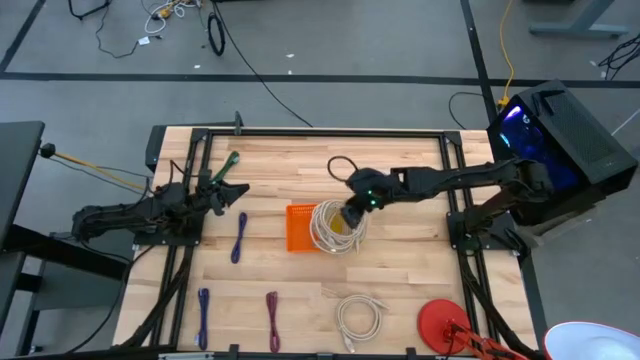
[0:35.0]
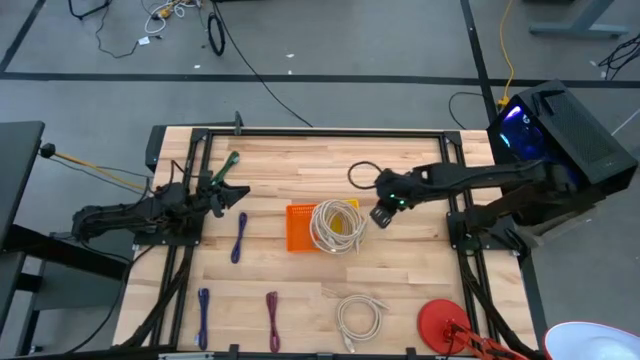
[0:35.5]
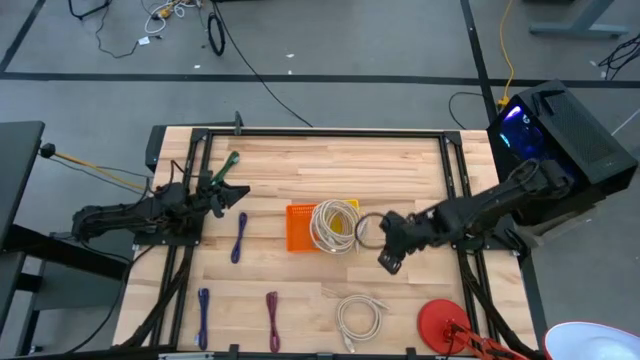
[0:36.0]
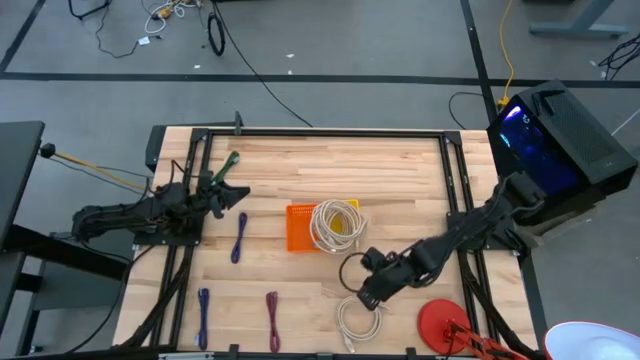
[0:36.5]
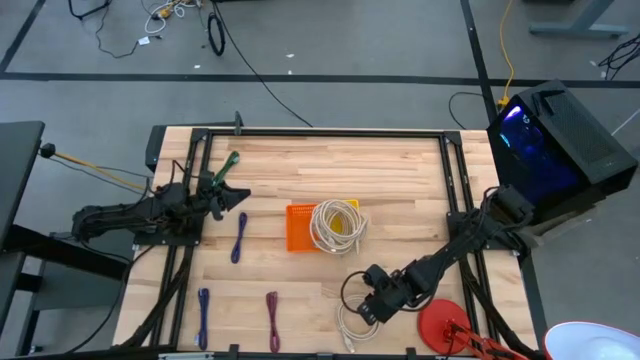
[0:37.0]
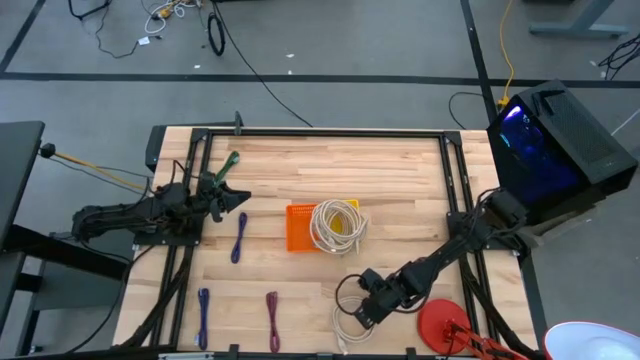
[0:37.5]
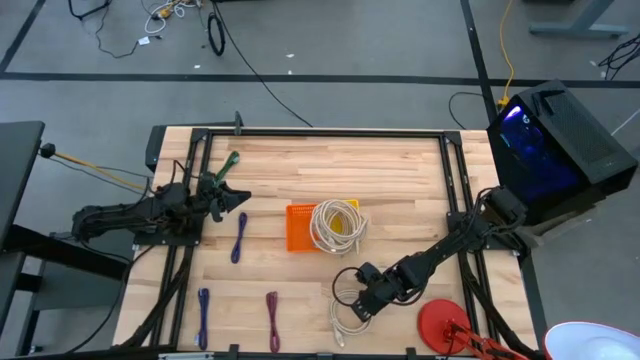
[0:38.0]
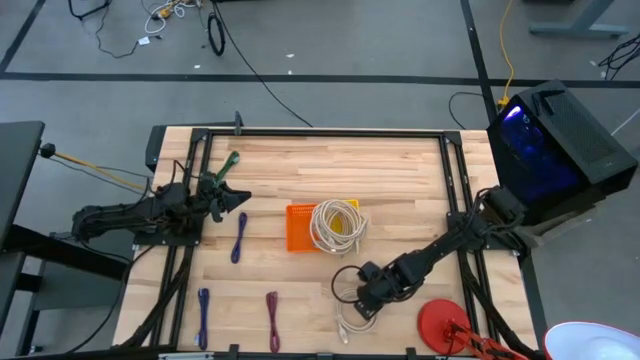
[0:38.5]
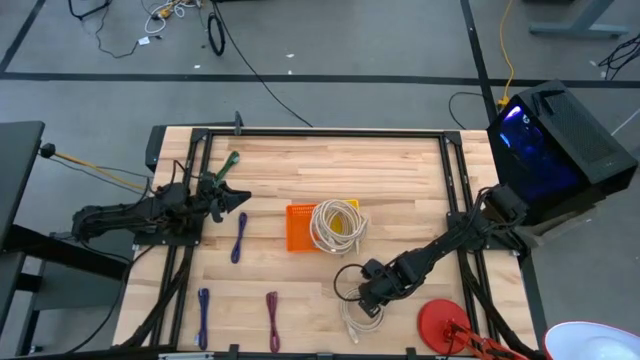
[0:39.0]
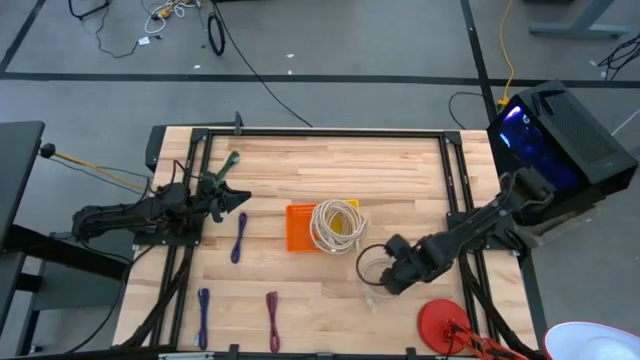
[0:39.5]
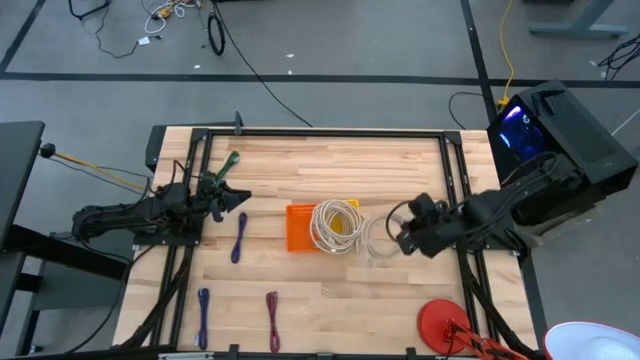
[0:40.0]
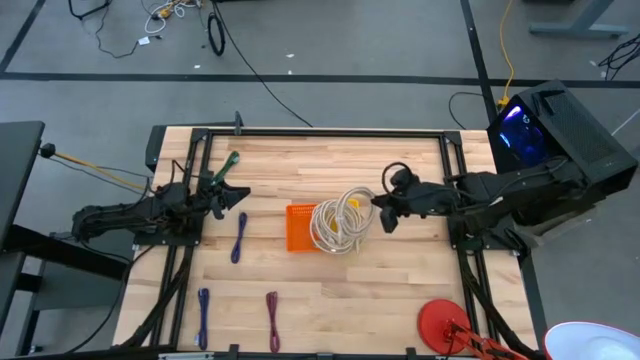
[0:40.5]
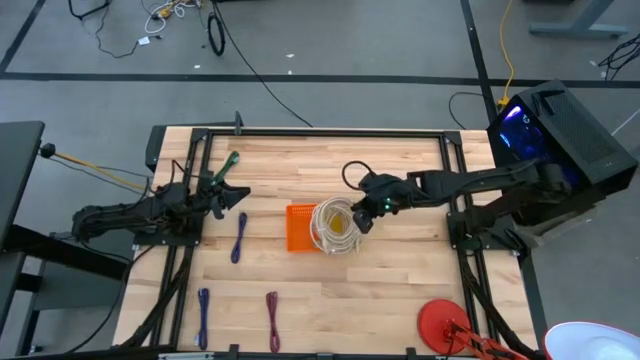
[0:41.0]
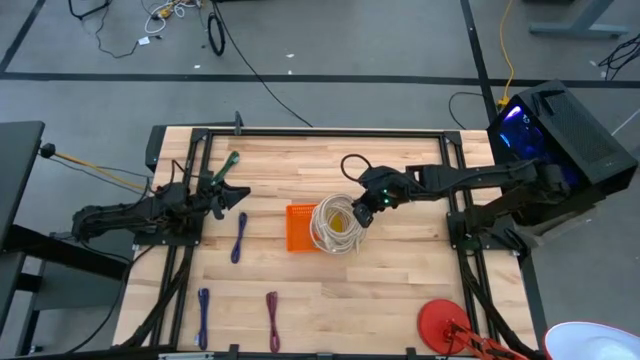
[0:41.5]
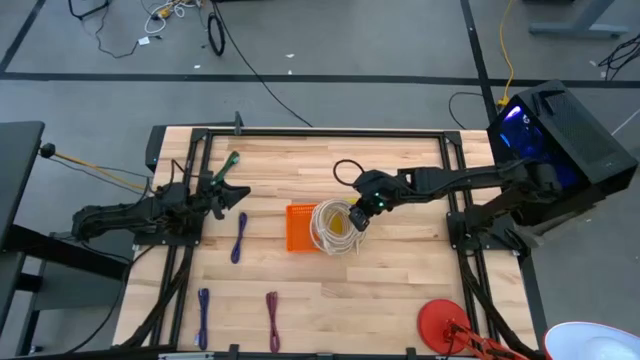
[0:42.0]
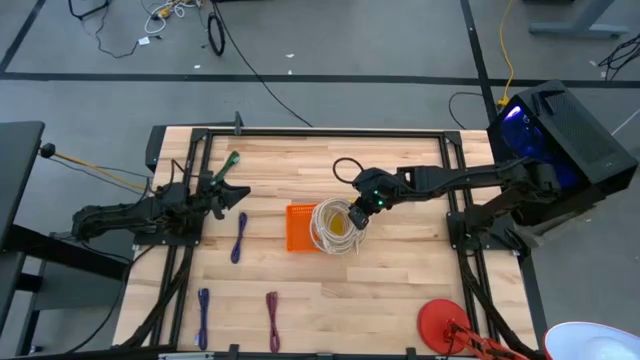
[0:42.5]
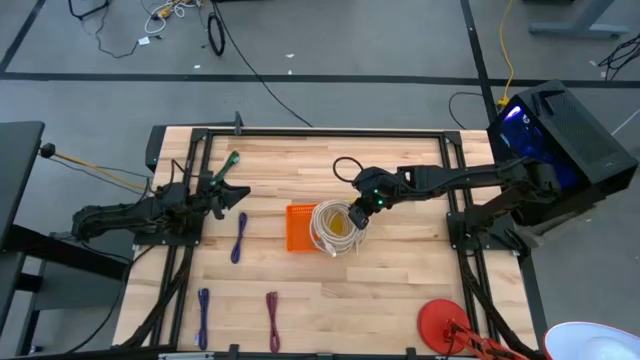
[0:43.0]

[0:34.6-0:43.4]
Task: Pick & Place USB Port
Put the brown HDMI cable into the yellow bin

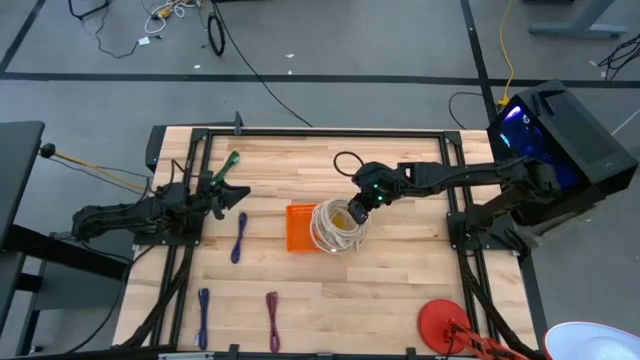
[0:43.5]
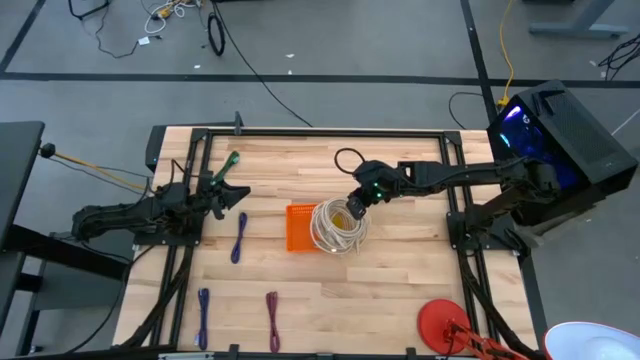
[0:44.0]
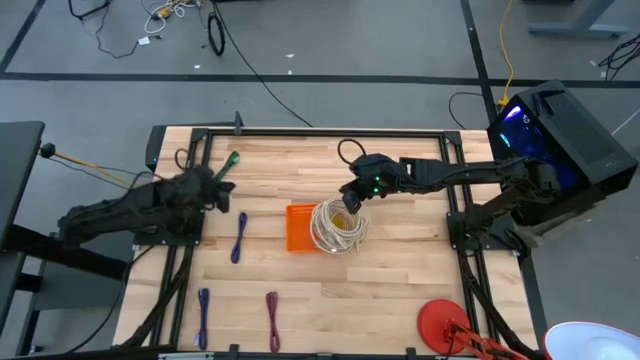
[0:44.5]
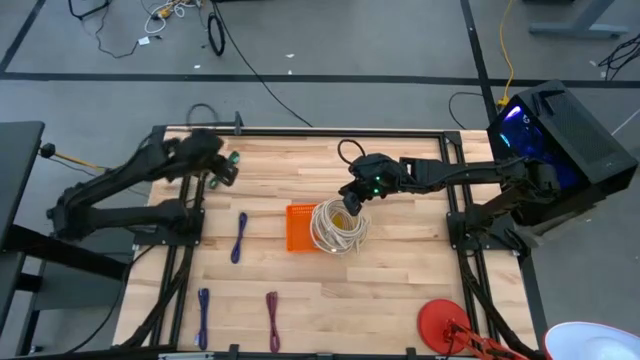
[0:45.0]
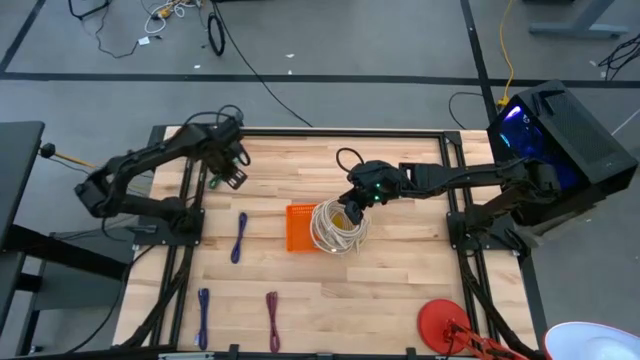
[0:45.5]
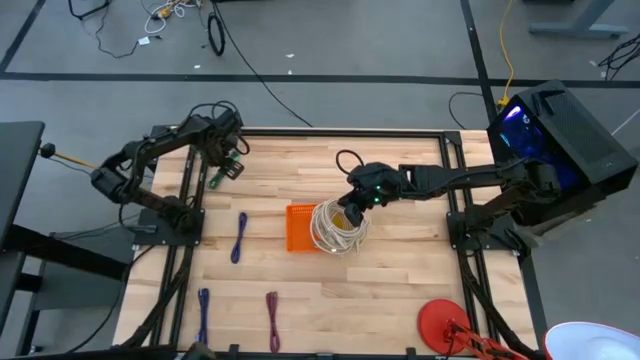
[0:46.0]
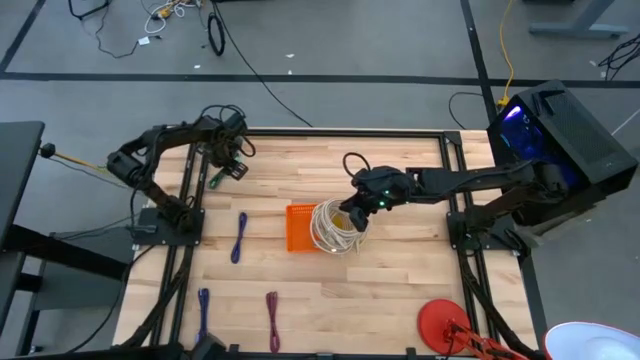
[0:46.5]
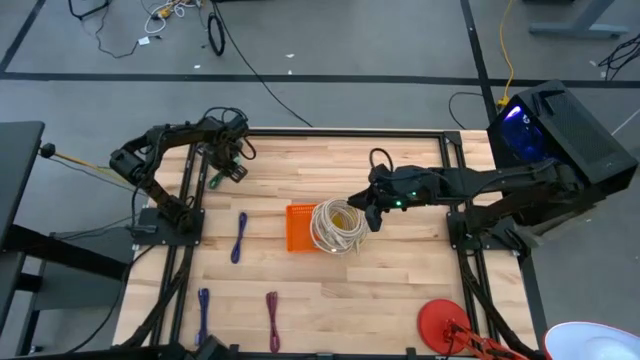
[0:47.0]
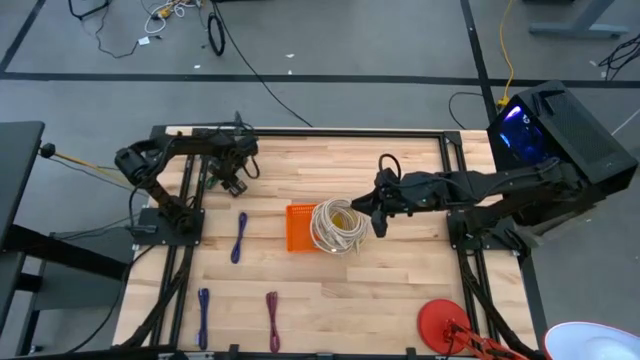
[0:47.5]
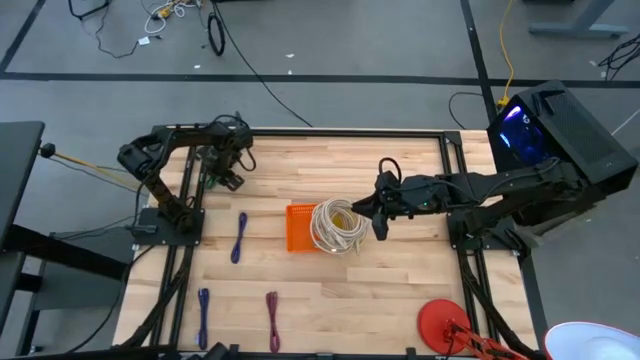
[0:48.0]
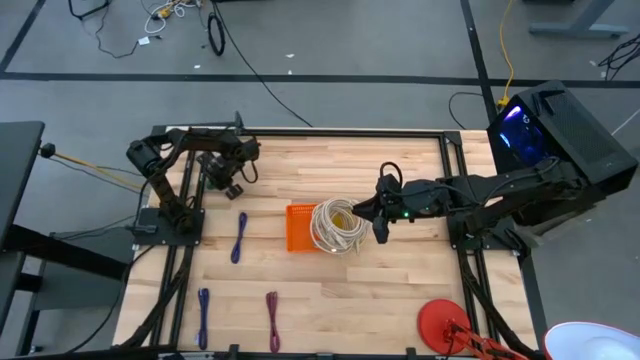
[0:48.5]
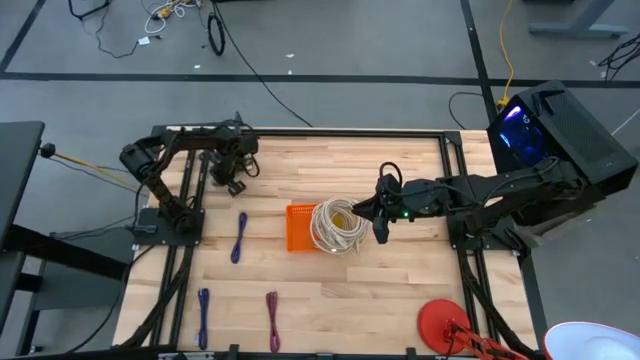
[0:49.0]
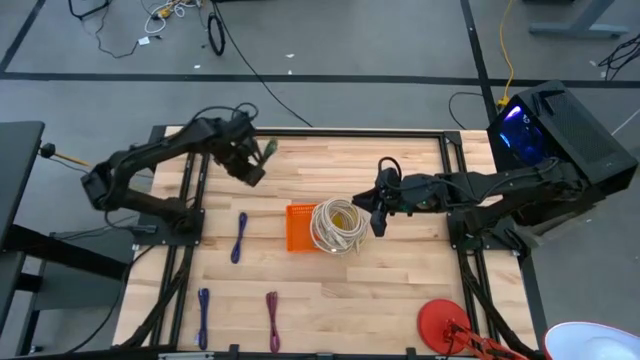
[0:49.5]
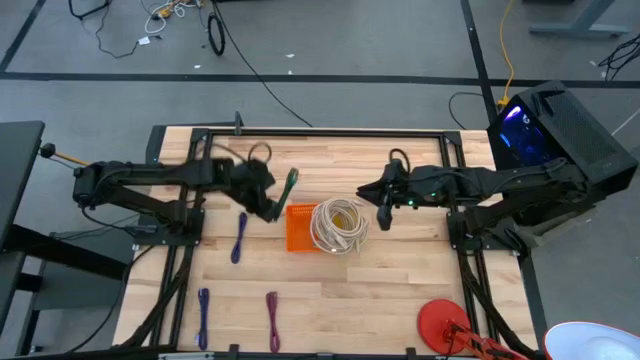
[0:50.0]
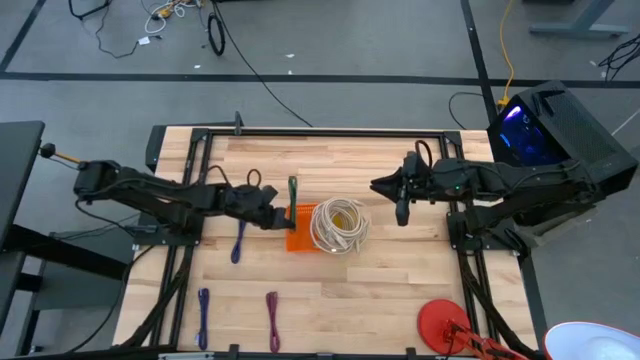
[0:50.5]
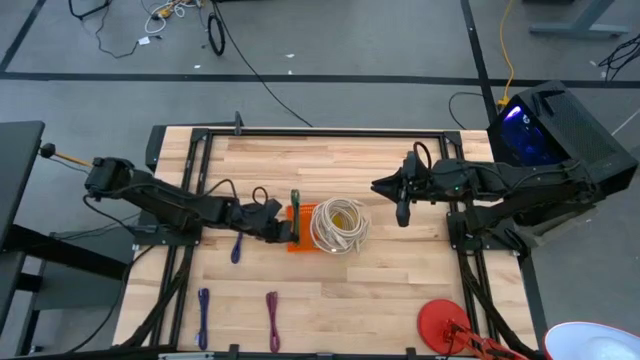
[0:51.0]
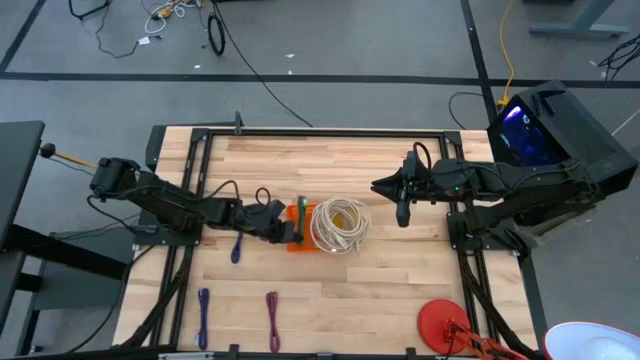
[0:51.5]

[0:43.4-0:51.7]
Put the green charger cable into the orange bin

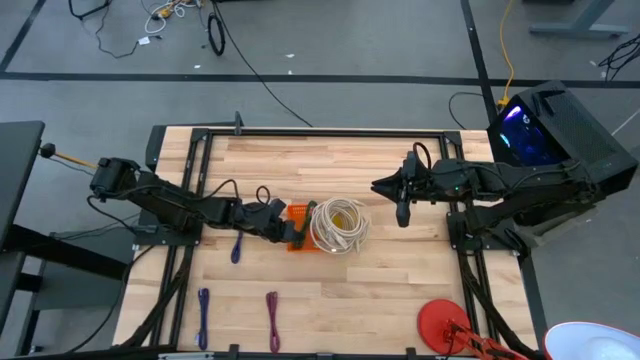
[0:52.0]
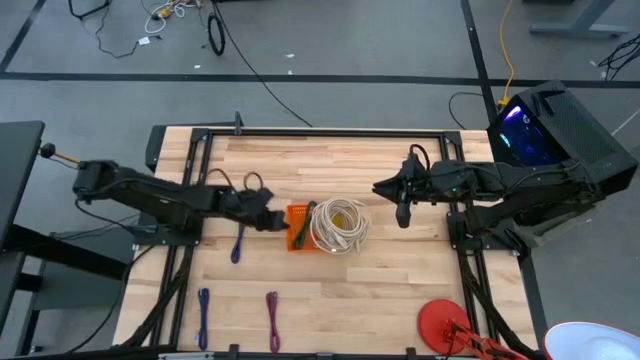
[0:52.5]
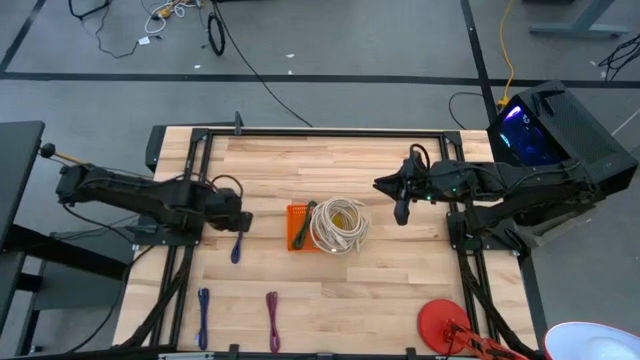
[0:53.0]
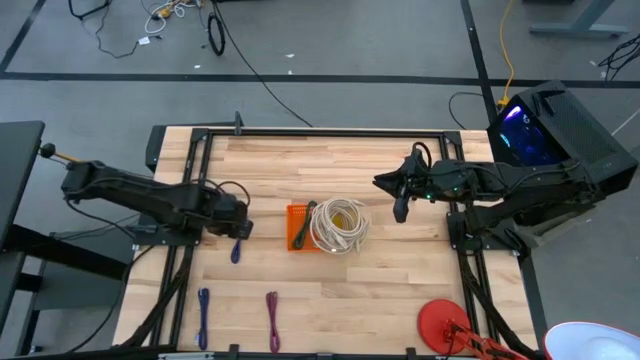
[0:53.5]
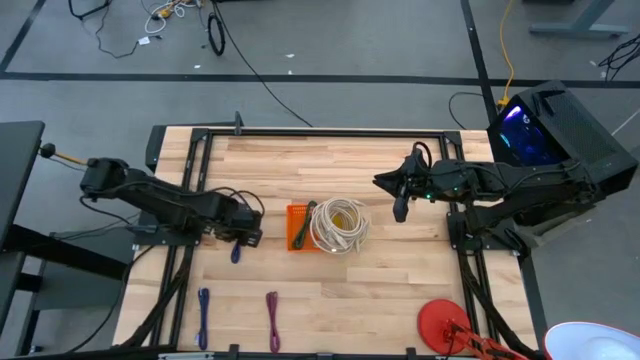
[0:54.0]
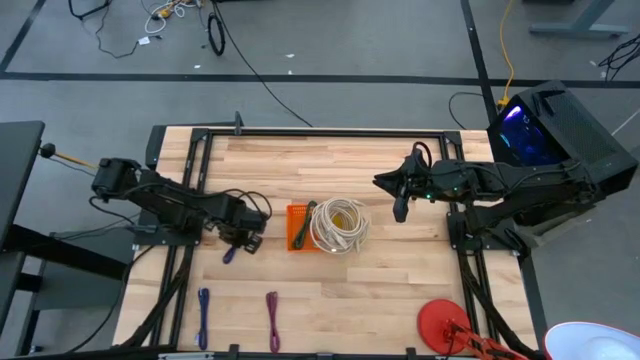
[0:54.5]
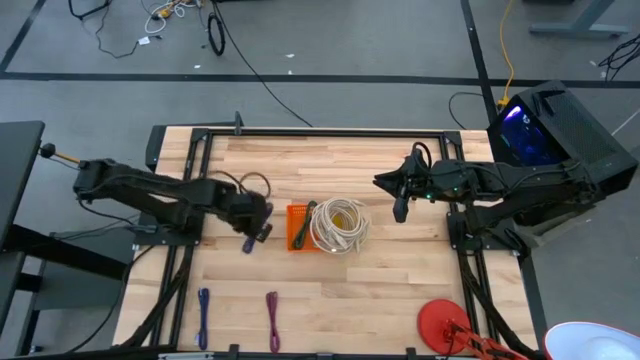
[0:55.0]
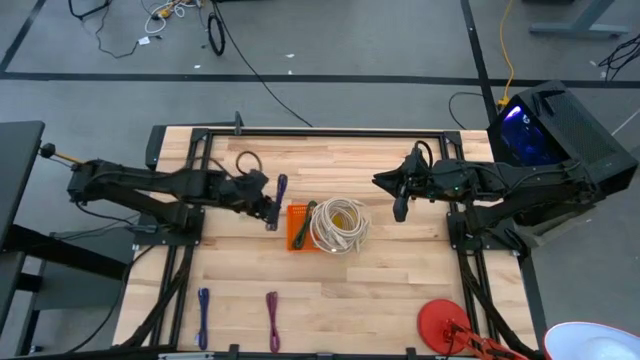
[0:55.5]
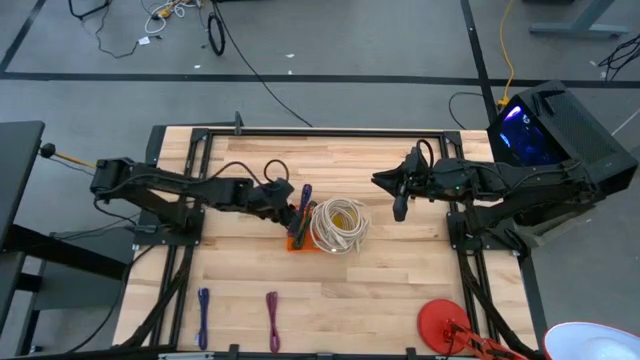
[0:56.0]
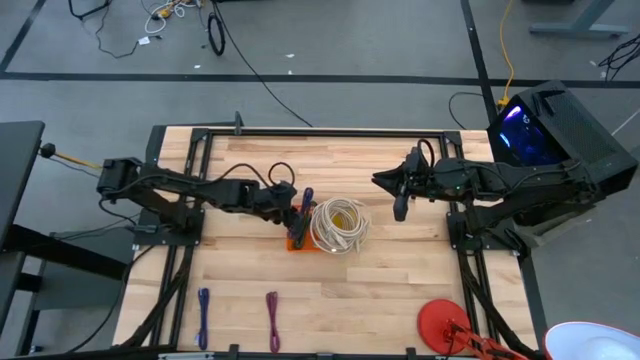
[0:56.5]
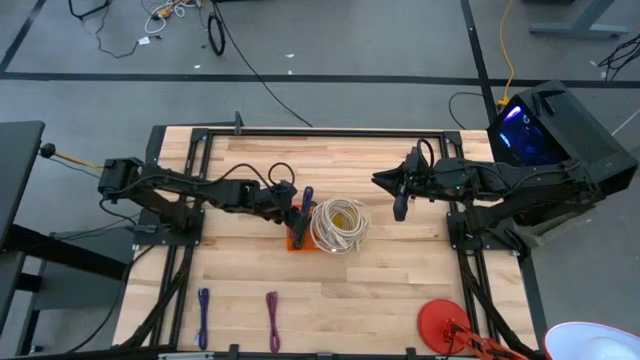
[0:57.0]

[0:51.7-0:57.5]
Put the blue charger cable into the orange bin
